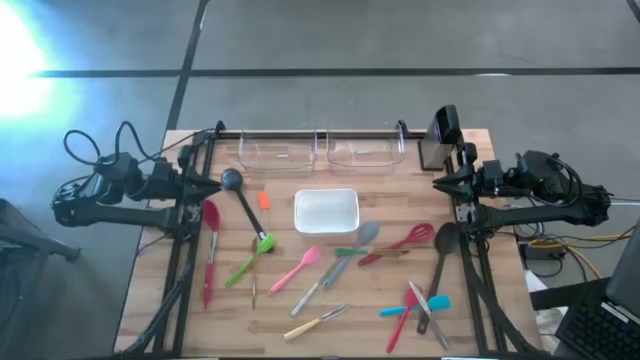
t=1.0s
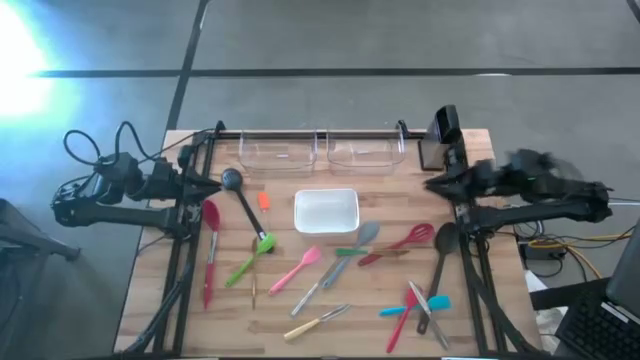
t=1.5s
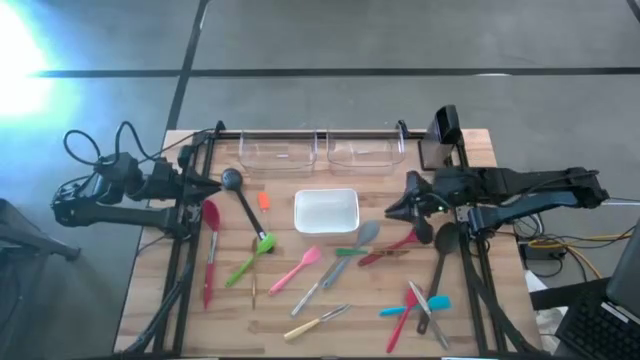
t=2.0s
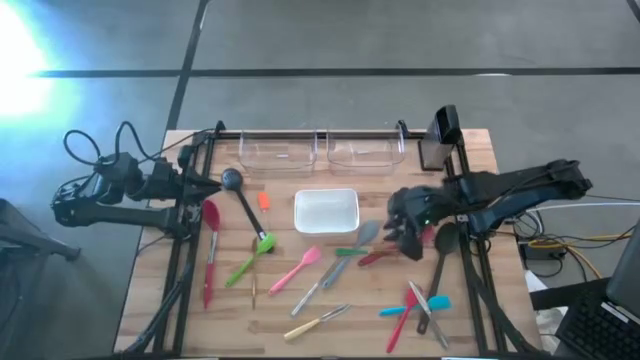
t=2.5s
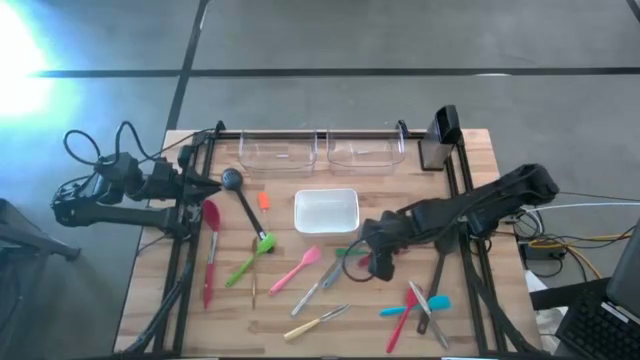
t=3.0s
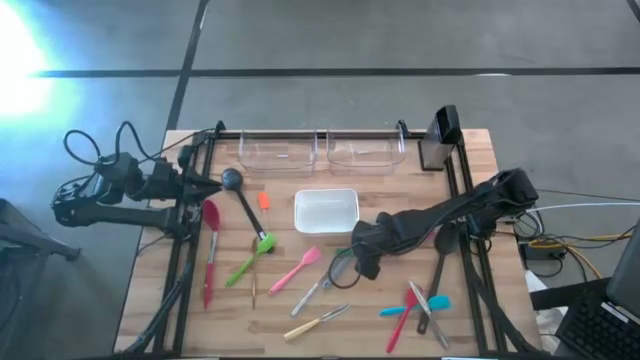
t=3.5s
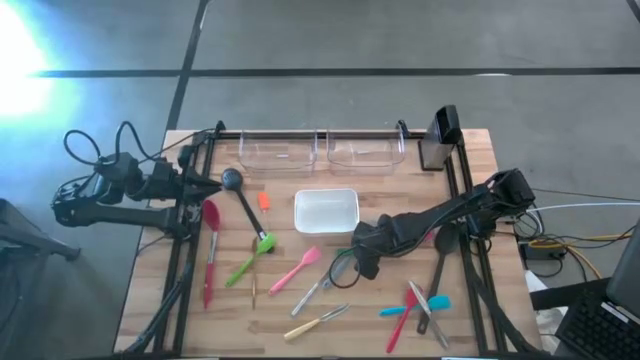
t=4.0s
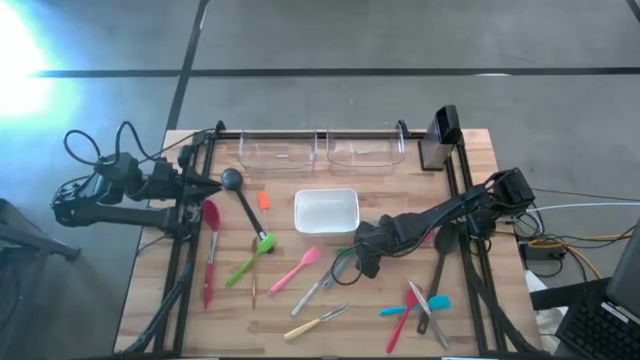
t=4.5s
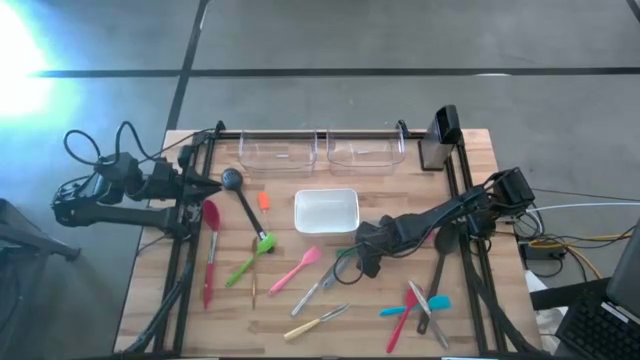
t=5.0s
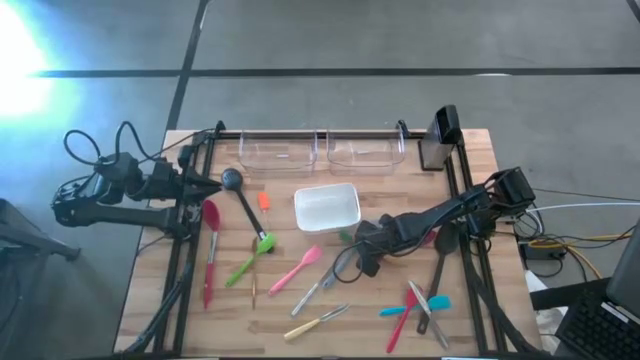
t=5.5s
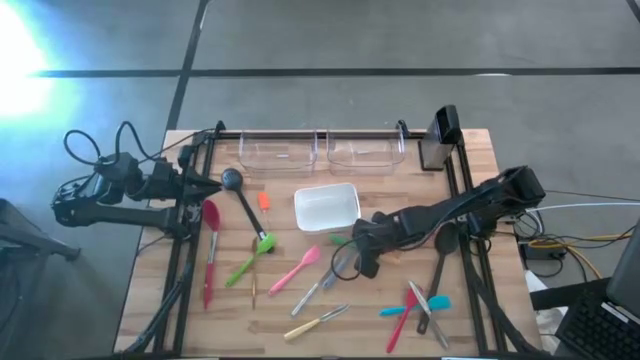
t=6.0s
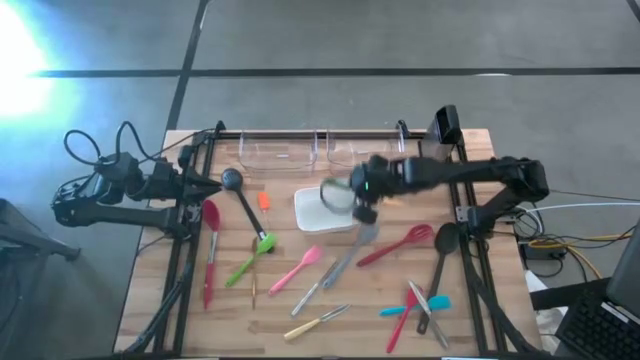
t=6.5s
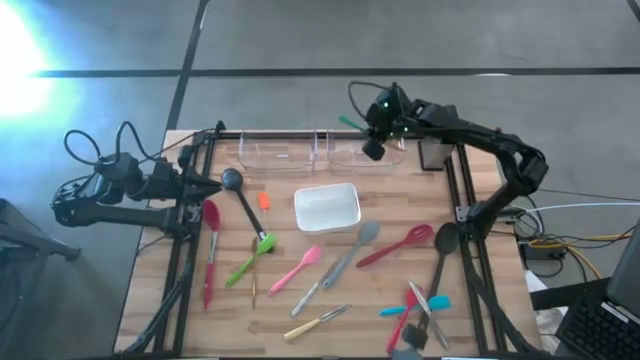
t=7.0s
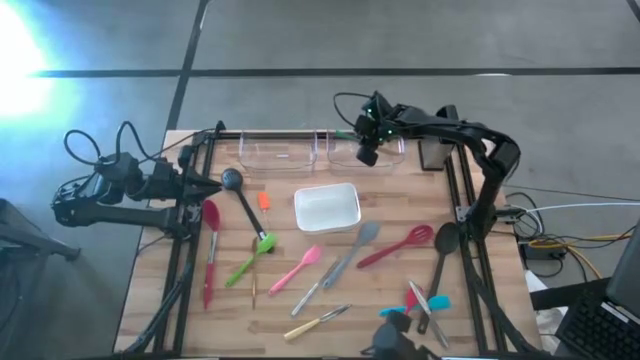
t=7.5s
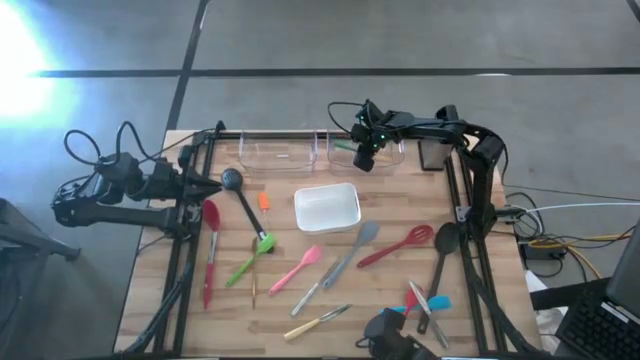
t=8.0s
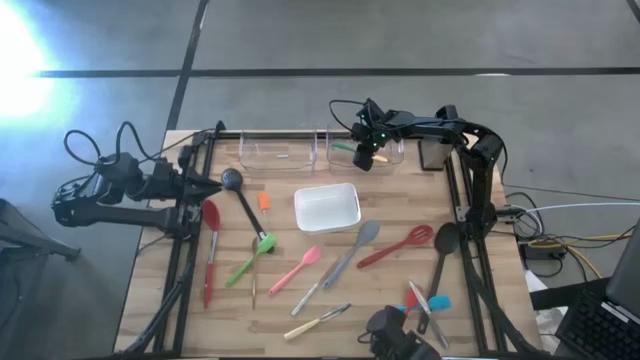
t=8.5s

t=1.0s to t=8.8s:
Task: Pick & Place Kitchen Items
Put the green table knife into the right transparent bin

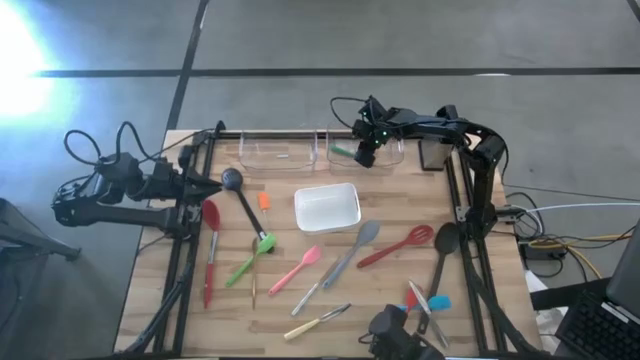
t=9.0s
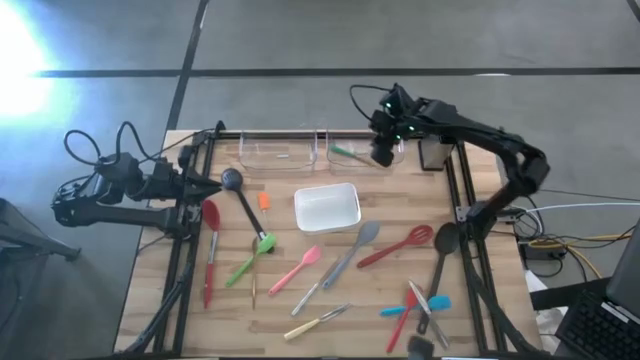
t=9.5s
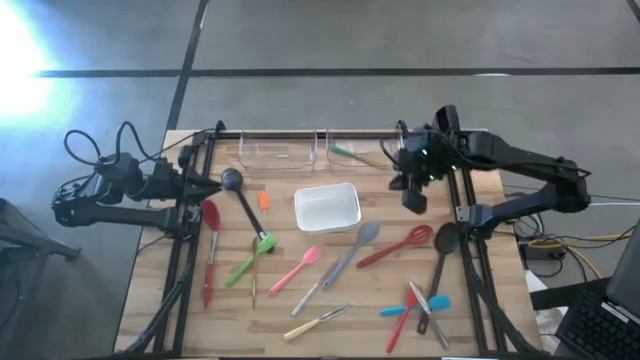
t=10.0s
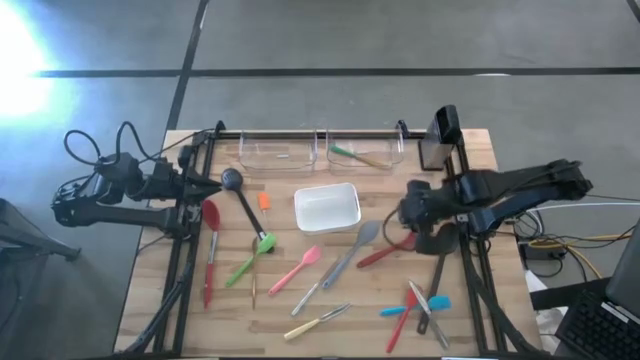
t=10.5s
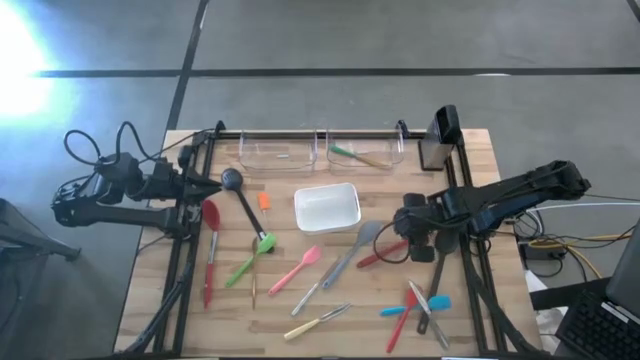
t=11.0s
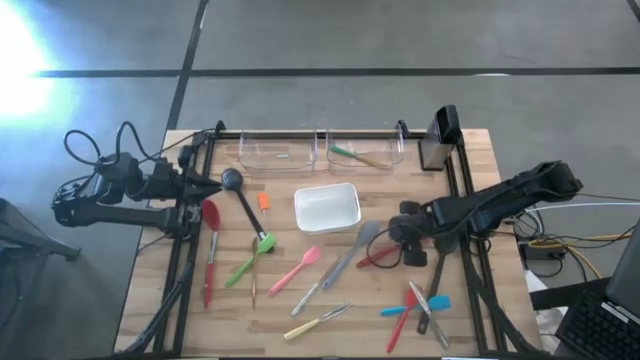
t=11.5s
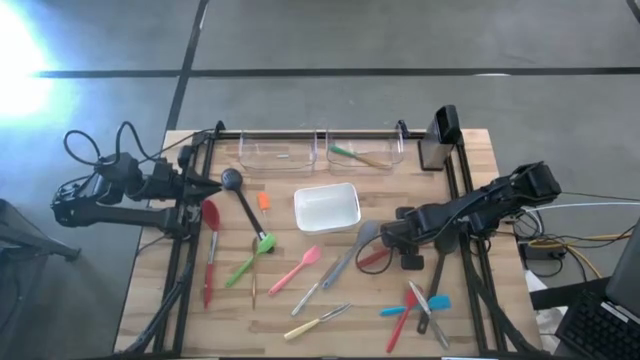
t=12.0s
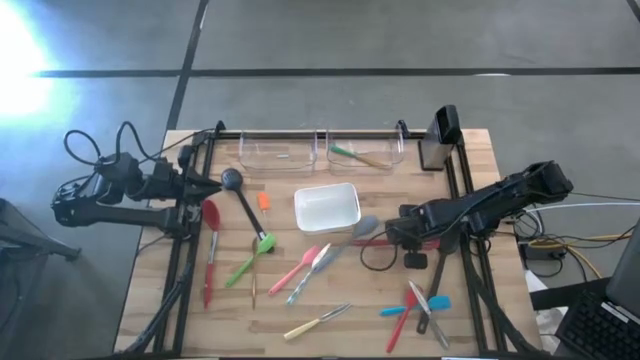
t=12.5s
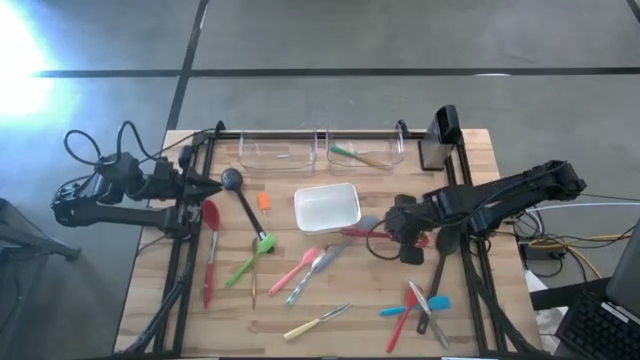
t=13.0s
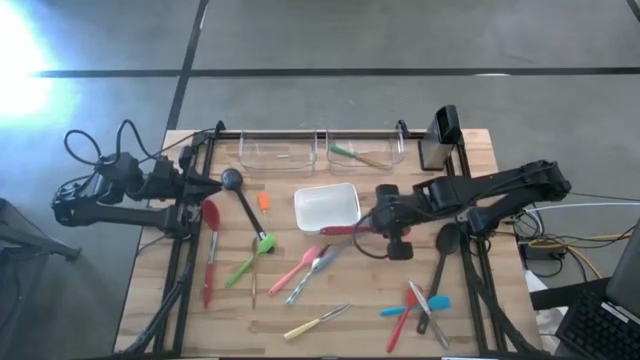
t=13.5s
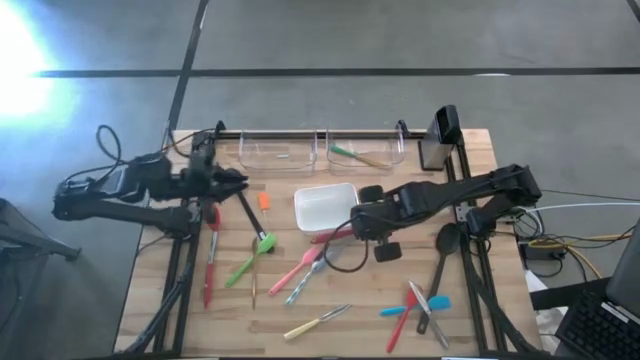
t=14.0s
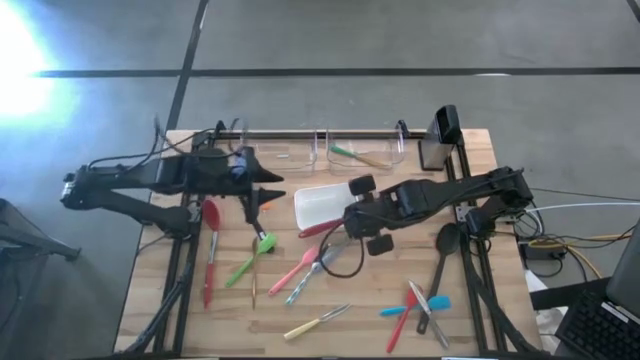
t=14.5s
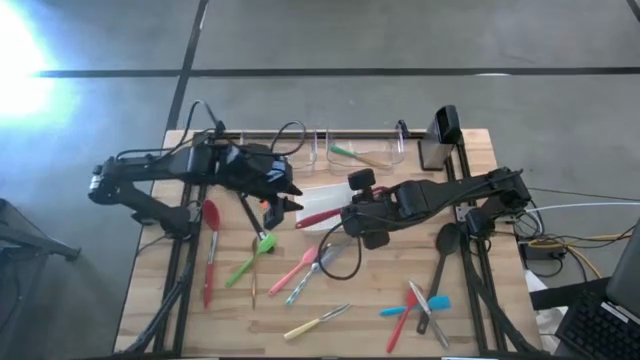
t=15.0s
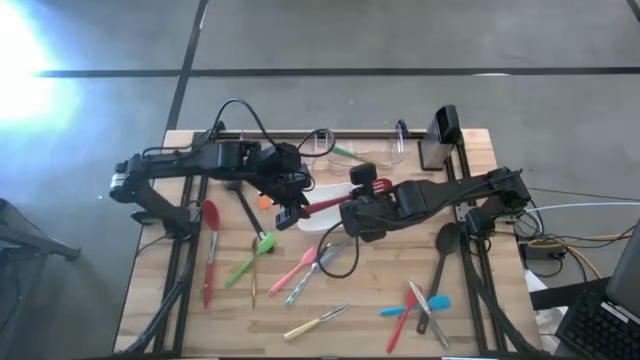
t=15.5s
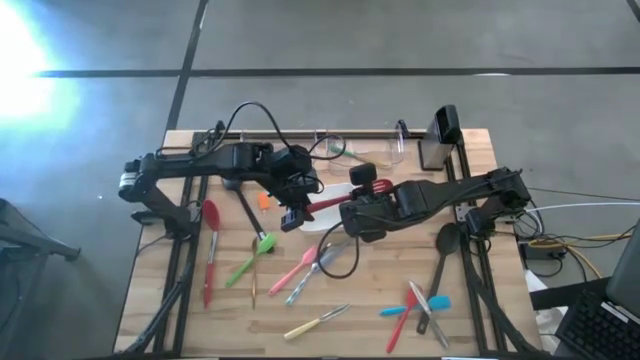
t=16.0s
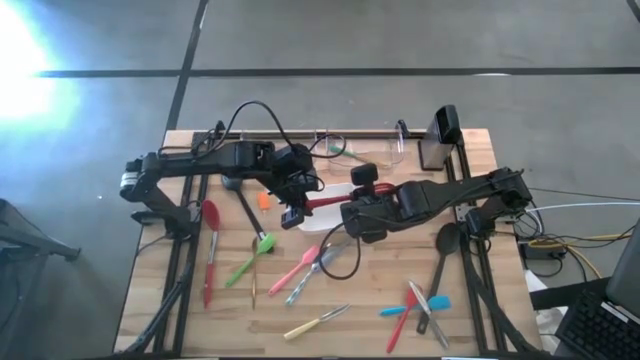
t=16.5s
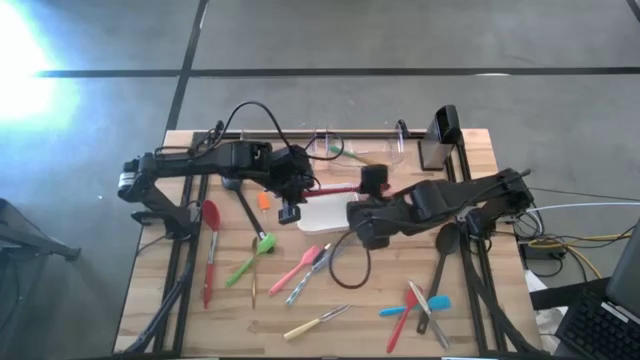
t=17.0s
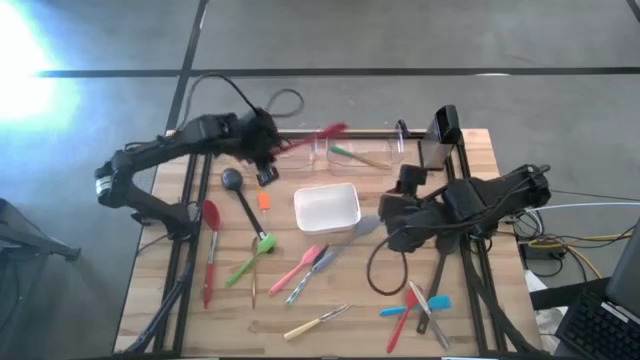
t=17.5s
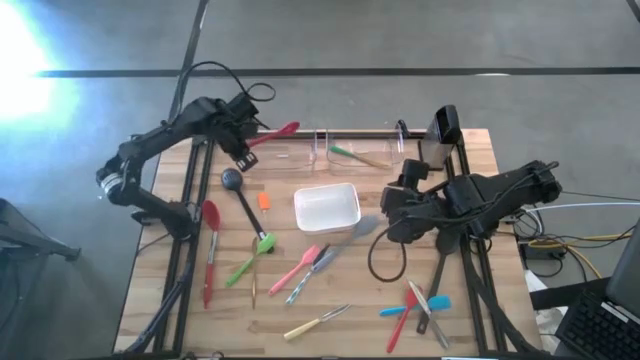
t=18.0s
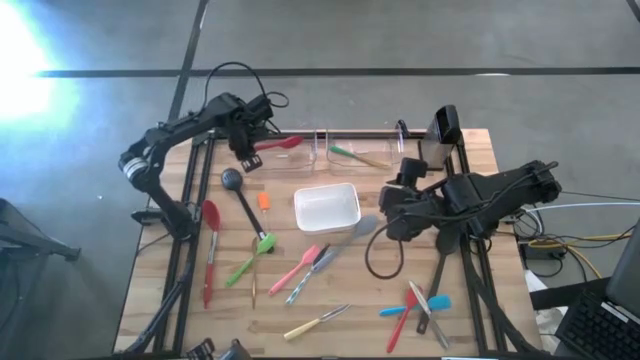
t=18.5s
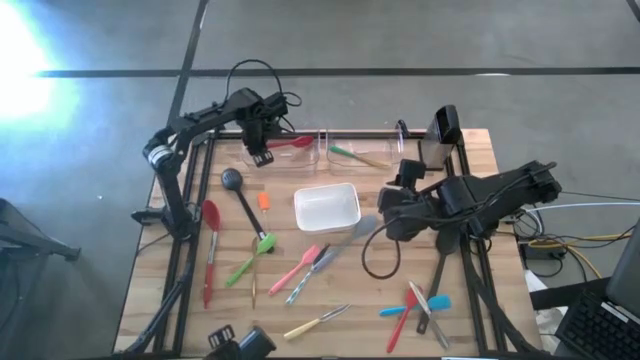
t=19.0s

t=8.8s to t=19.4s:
Put the red slotted serving spoon into the left transparent bin

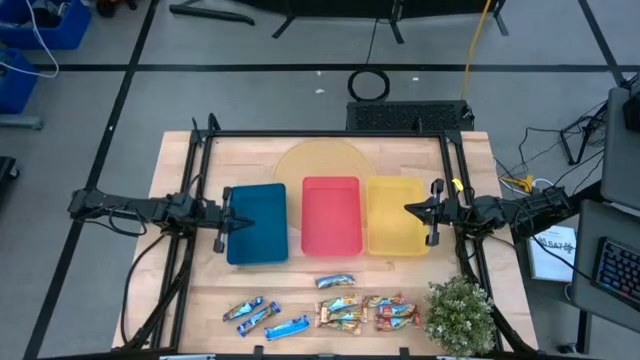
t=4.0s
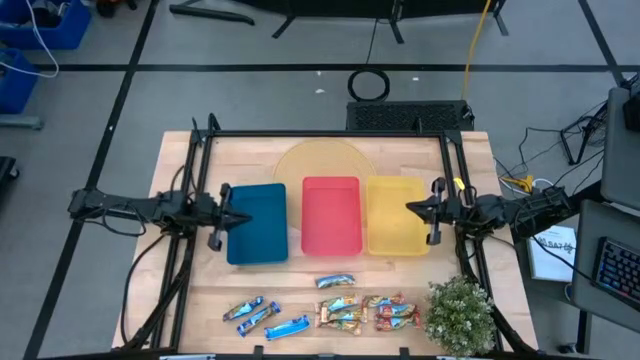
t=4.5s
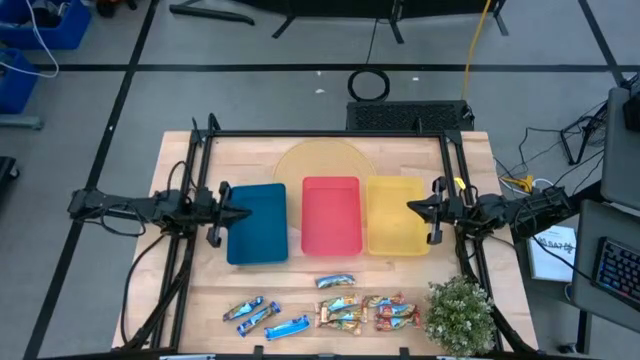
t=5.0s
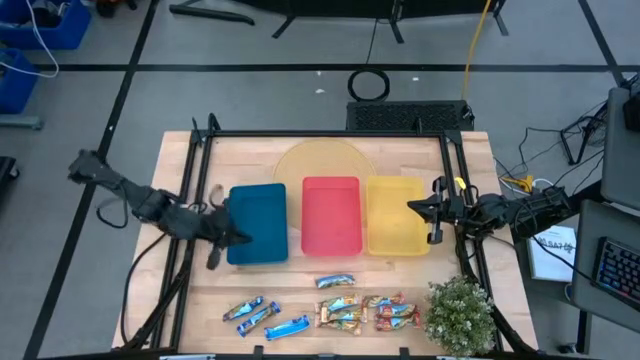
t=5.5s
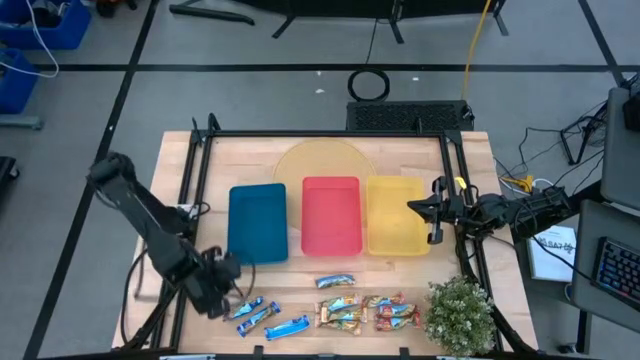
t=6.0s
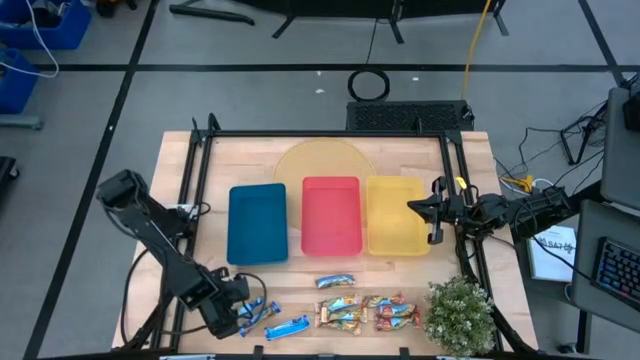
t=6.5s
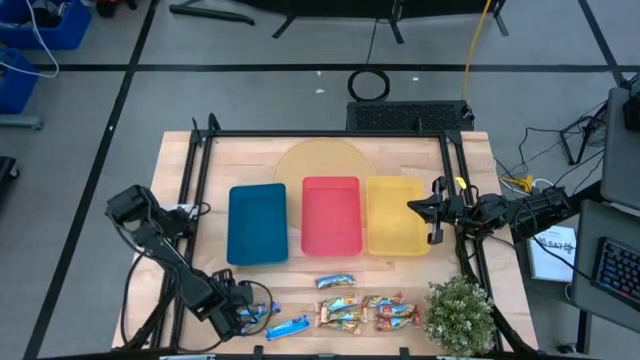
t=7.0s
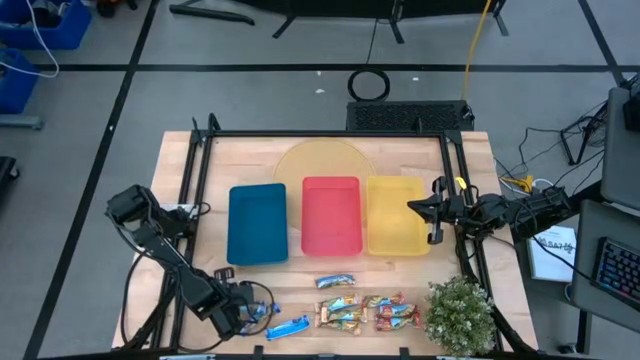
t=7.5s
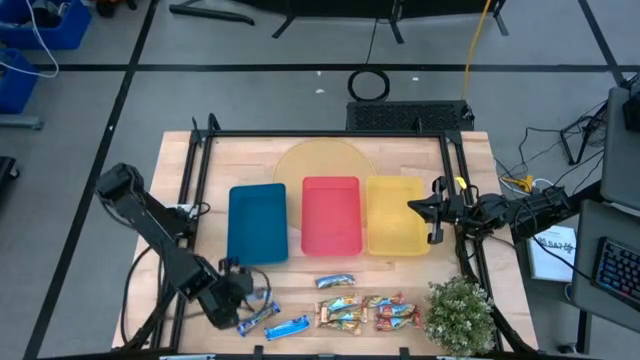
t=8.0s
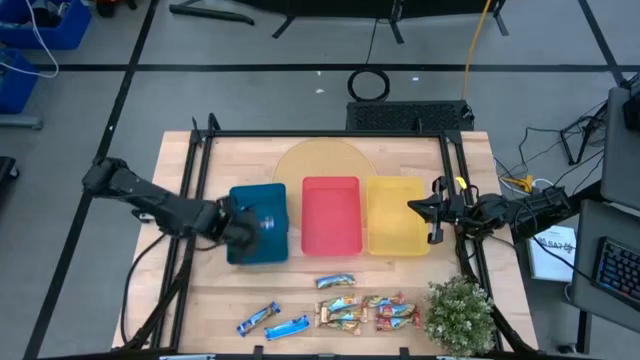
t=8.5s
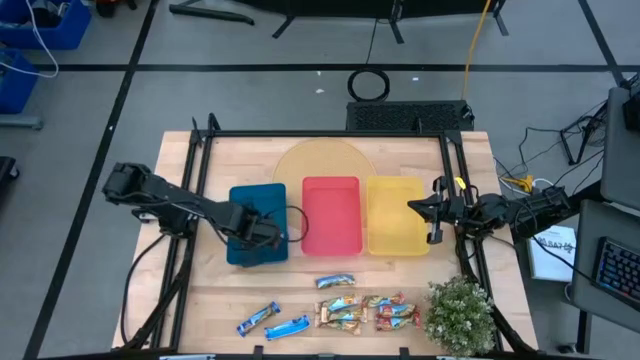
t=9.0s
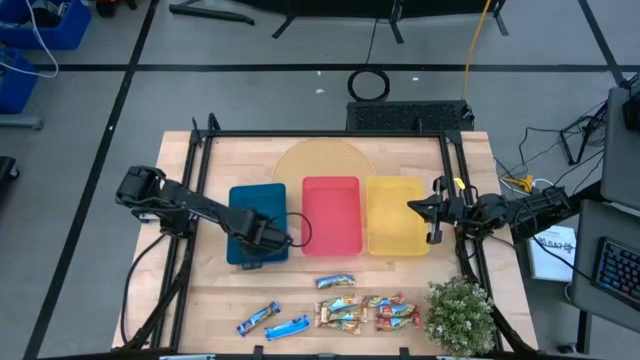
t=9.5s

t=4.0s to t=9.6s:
Task: Pick and place Granola Bars by type
Put the top left blue granola bar into the blue bin
